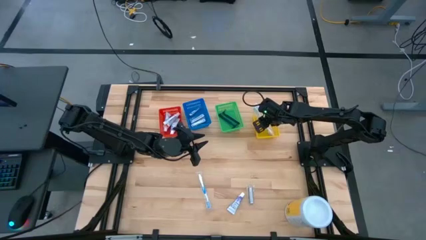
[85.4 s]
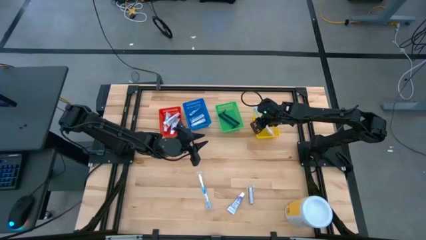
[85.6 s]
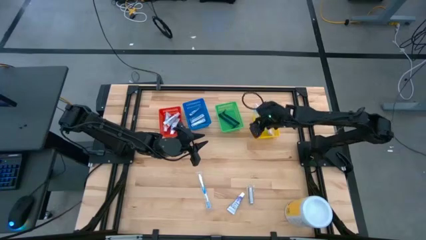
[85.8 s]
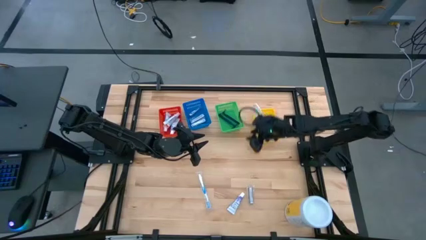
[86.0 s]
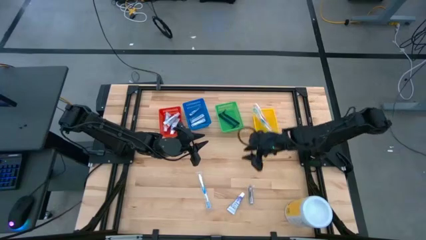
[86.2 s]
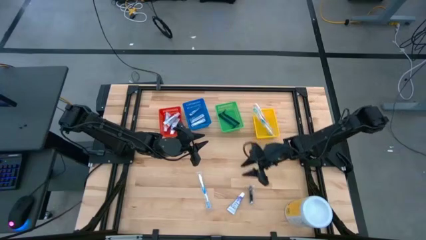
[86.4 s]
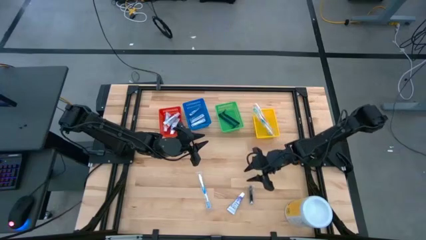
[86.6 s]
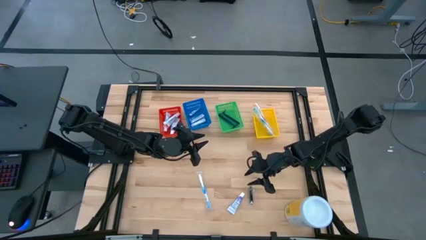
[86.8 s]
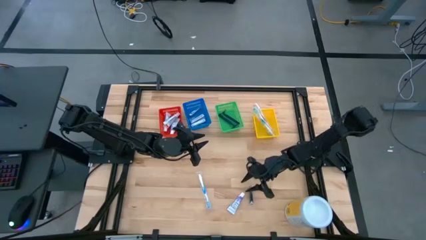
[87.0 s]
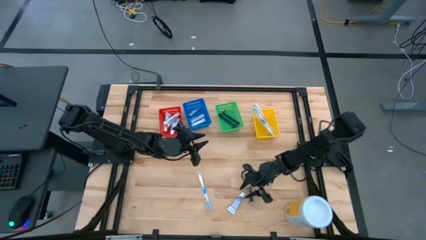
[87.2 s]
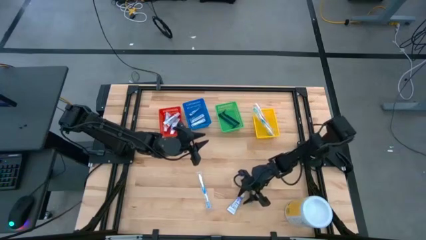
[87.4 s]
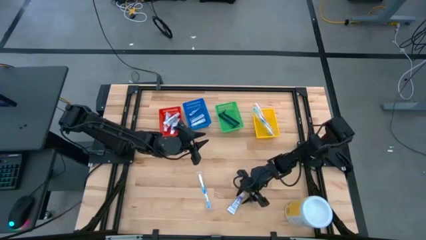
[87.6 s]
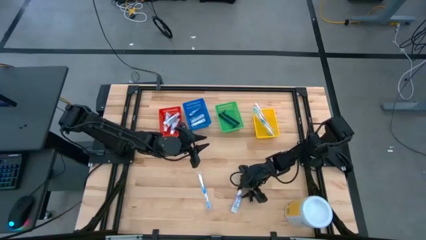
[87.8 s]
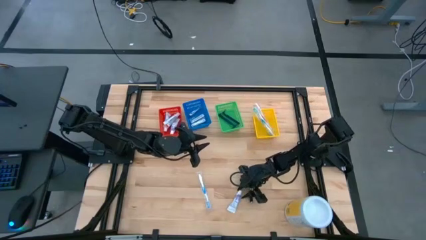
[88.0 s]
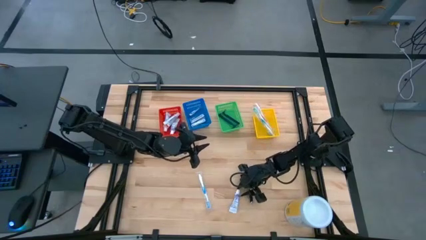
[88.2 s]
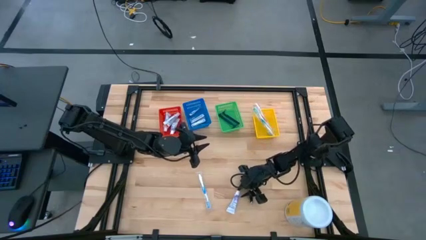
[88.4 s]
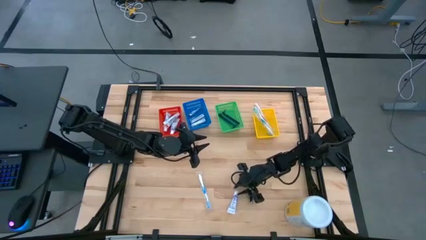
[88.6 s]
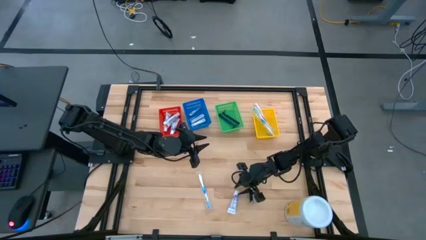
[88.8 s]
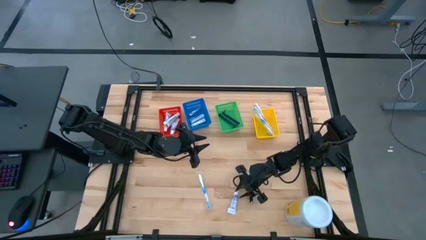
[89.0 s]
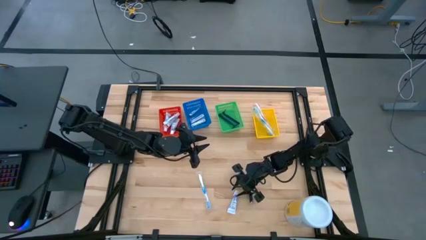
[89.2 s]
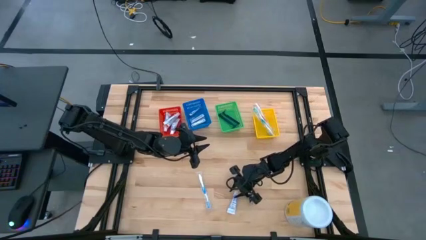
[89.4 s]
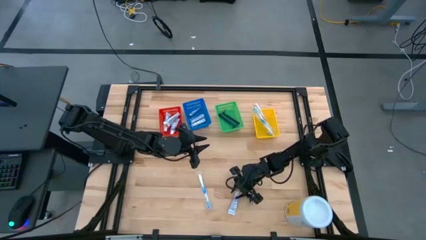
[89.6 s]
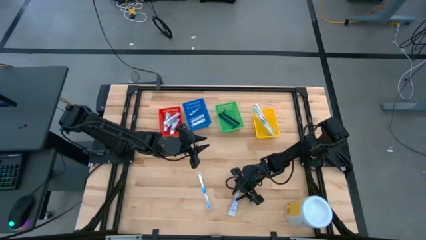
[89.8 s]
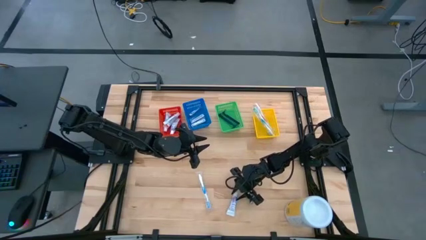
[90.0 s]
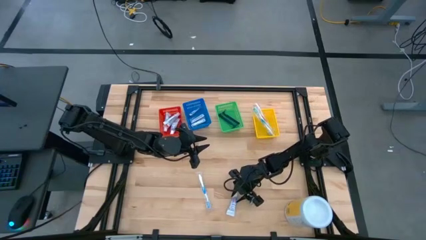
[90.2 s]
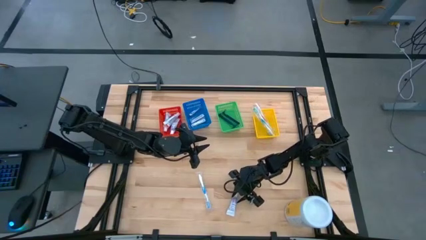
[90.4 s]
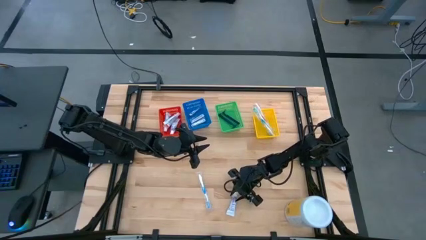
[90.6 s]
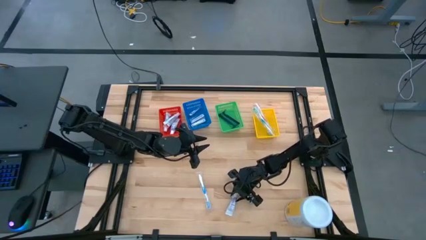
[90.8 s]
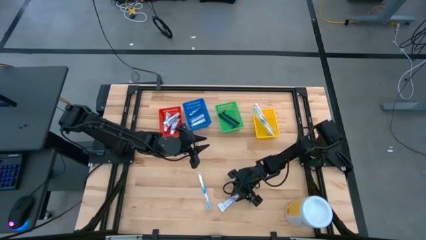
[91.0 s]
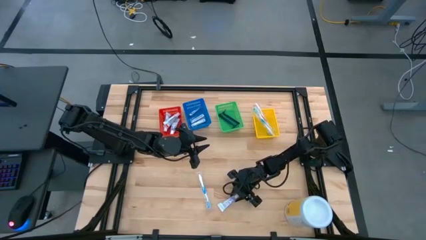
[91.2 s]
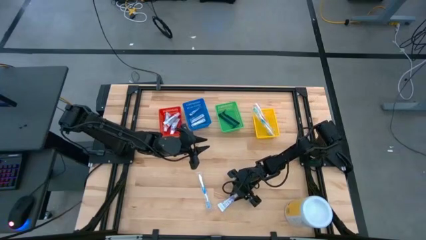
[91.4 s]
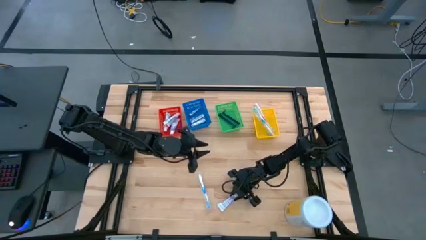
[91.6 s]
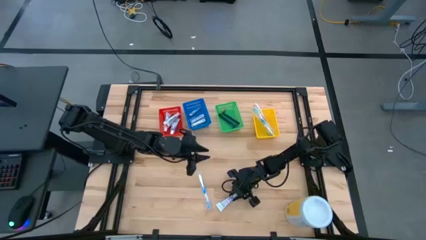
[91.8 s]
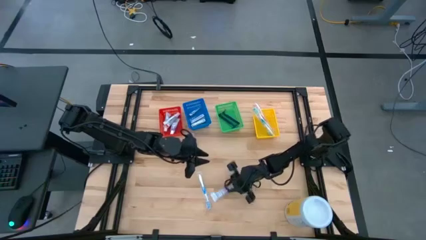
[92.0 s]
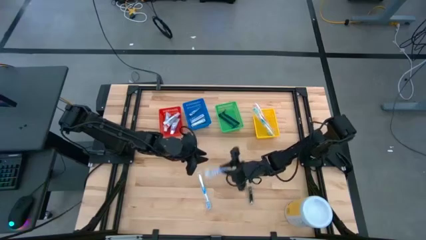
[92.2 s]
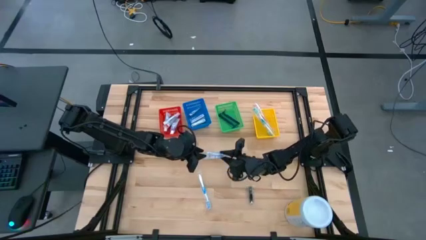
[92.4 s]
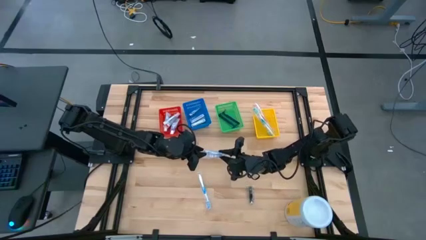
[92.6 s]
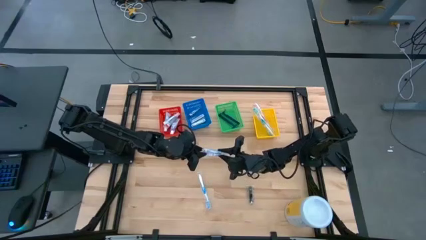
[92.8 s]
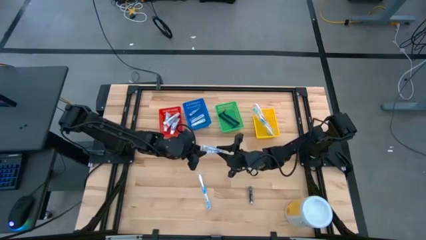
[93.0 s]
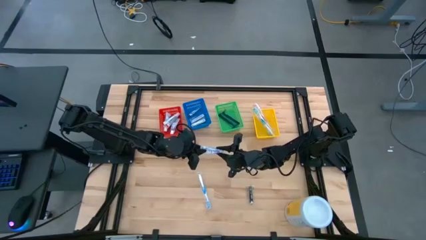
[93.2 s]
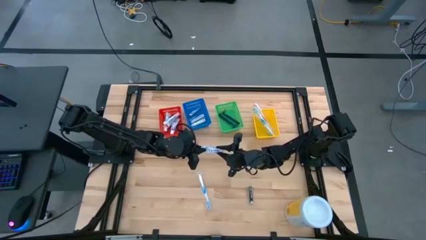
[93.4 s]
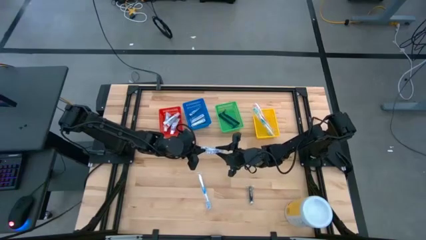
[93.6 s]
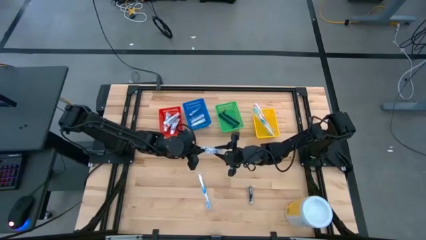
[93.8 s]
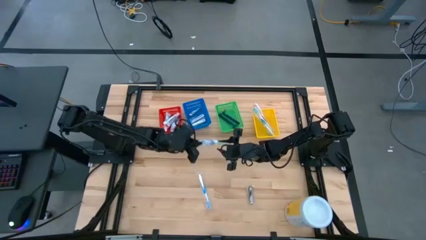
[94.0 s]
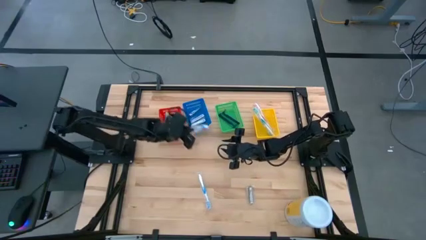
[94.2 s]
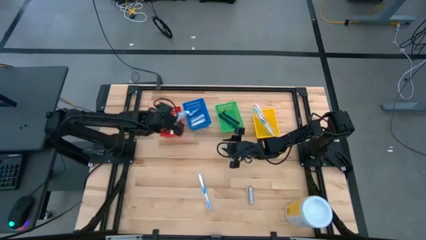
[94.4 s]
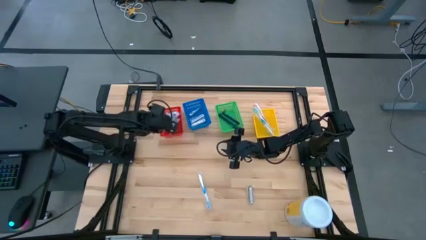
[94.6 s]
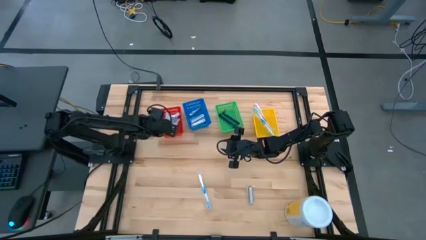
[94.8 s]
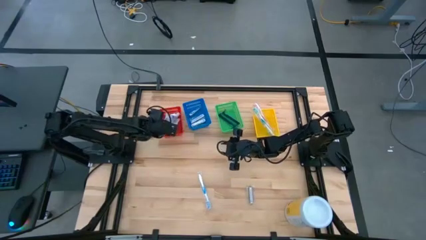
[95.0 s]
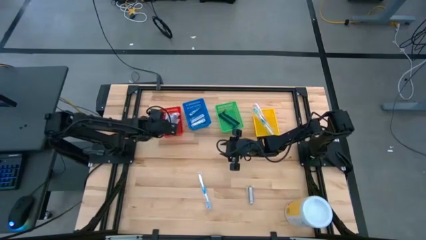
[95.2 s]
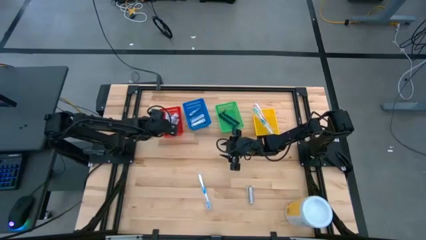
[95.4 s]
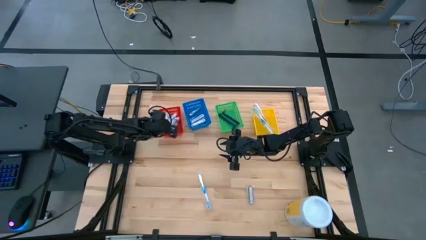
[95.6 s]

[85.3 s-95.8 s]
Task: Pick & Place Travel size toiletries
Put the toothpaste into the red bin

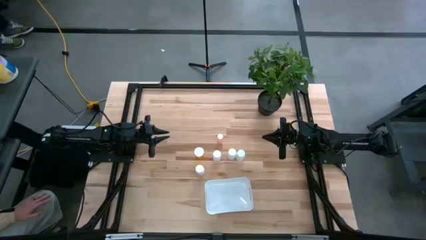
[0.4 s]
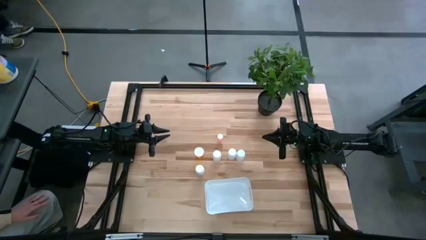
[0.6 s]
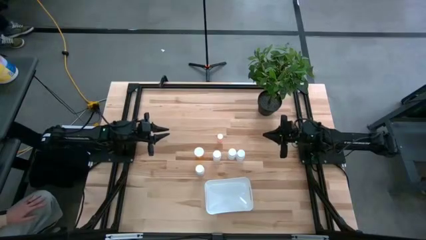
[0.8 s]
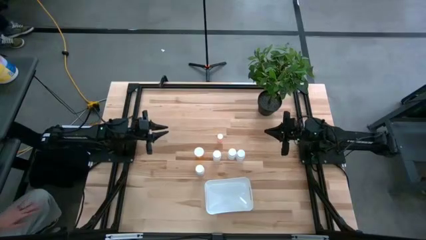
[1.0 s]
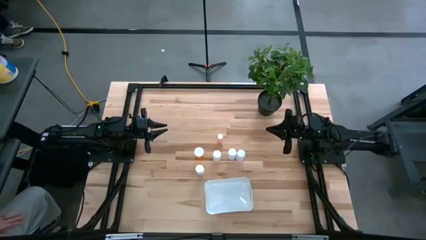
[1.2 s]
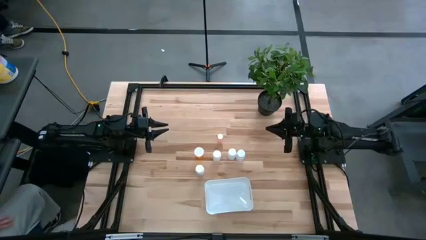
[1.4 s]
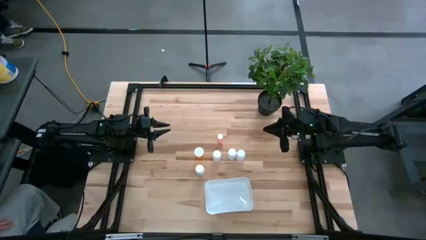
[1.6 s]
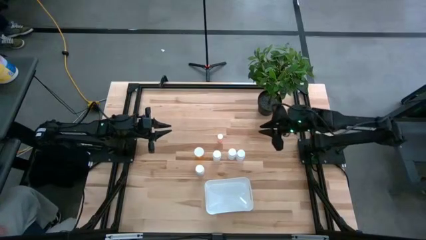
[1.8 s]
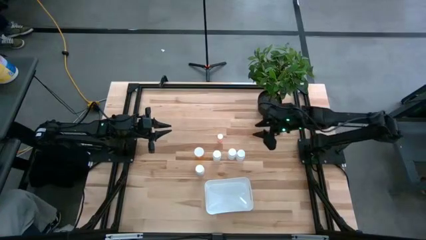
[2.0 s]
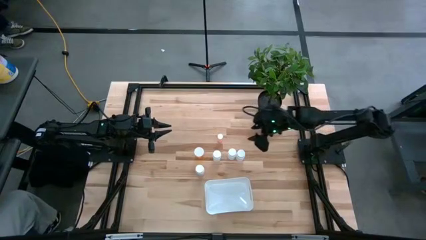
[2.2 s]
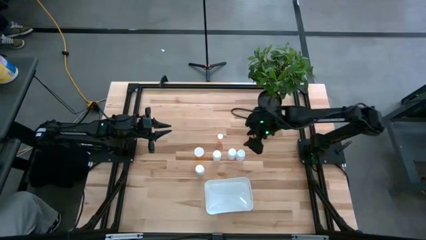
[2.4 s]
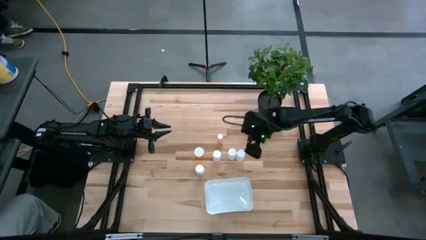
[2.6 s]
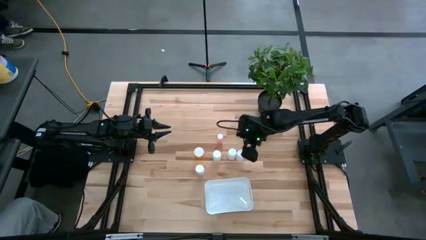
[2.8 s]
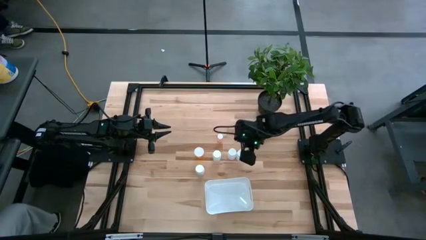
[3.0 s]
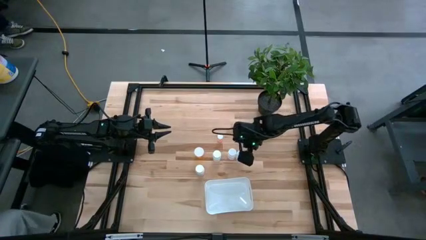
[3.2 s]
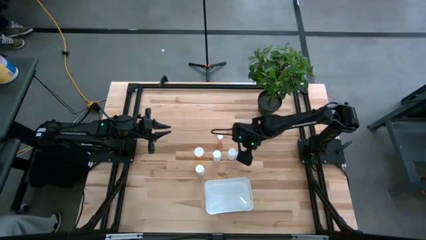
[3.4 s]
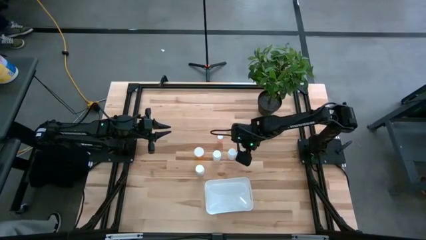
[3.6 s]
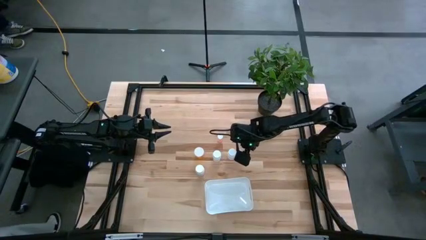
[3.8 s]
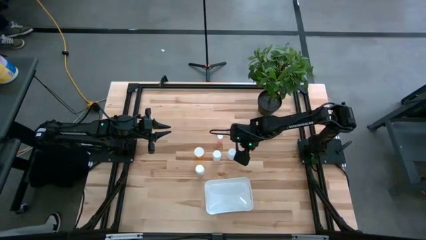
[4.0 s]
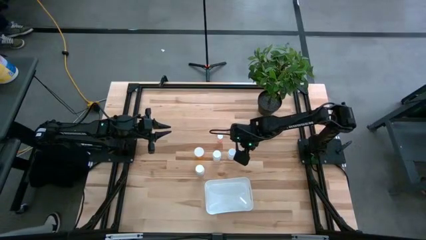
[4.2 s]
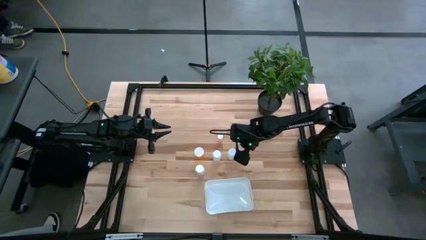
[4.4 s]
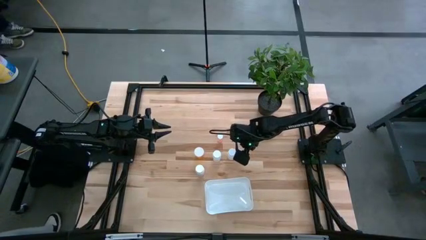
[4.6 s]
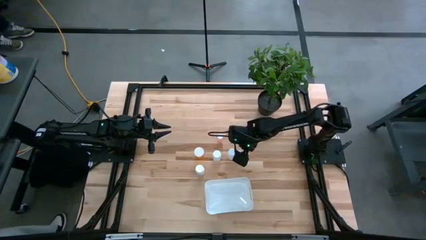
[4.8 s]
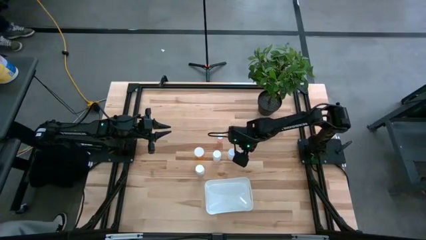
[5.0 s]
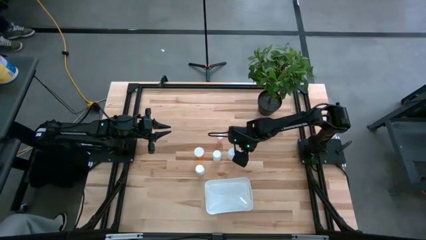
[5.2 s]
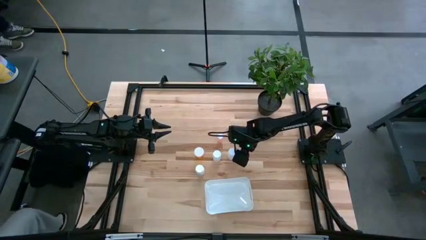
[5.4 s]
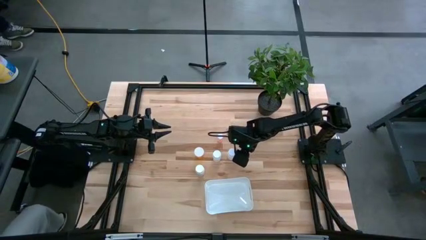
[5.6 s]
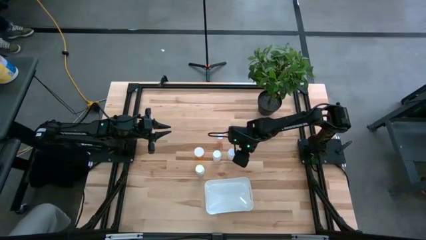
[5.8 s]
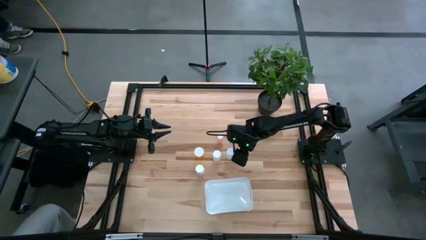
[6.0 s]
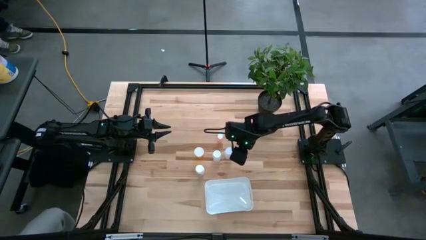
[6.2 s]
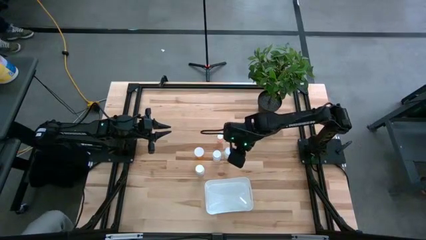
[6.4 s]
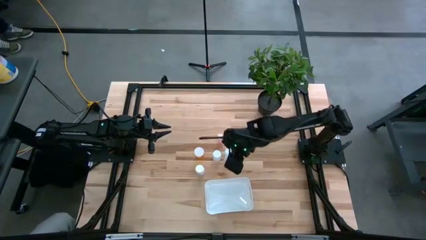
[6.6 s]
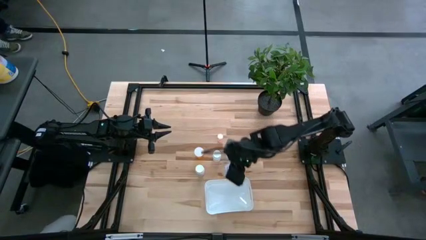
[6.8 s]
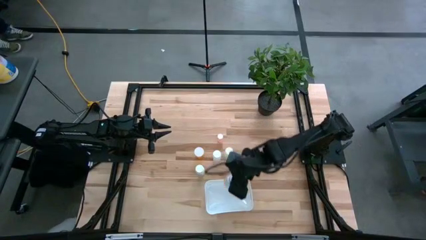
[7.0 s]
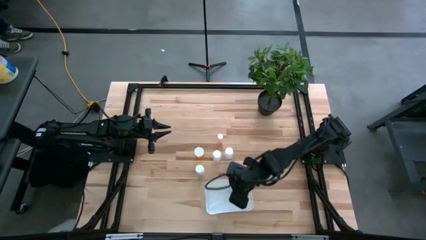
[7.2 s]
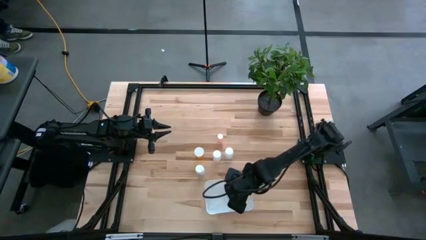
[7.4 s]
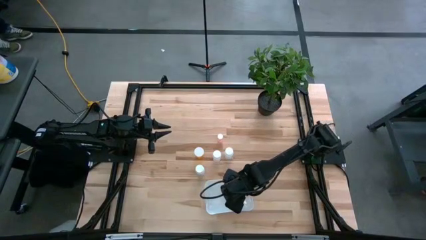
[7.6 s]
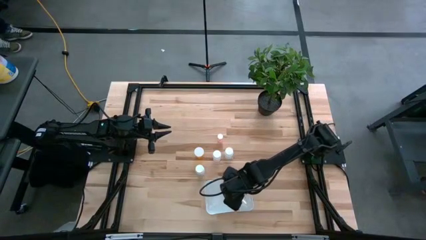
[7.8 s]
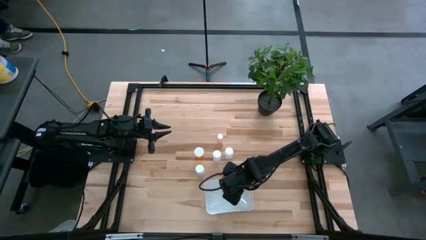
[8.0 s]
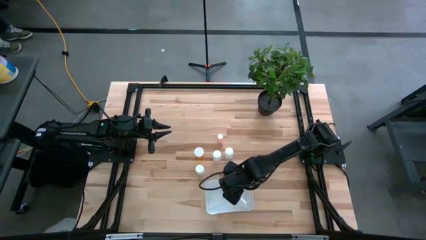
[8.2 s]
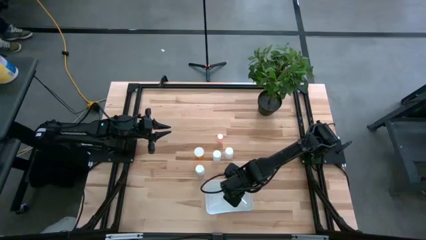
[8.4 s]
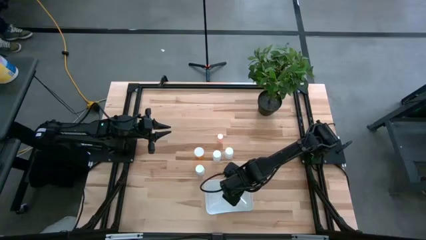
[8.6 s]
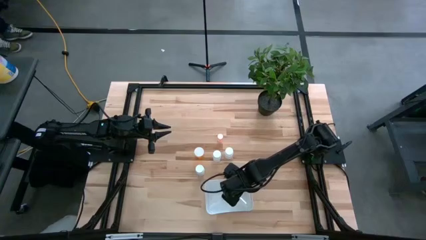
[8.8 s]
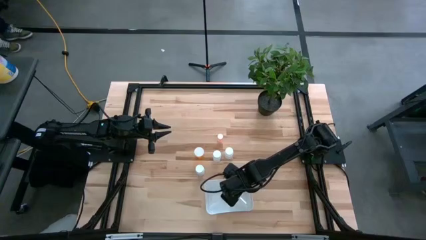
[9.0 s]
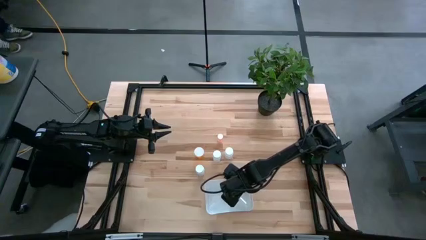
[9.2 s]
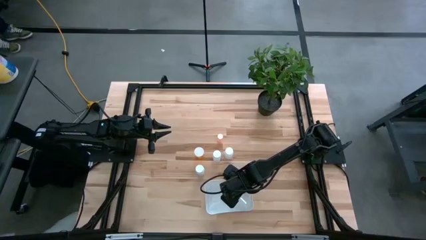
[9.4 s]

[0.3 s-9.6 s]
Task: Pick and place pill bottles into a basket
Put the white pill bottle into the white bin
